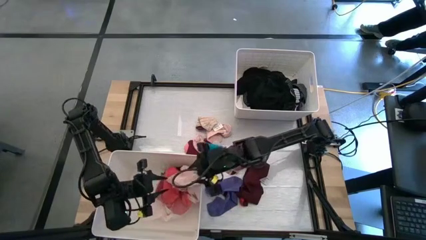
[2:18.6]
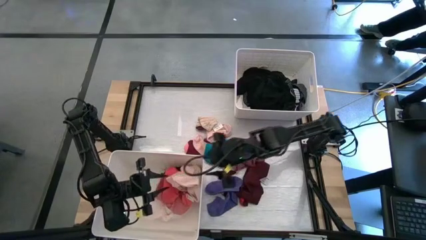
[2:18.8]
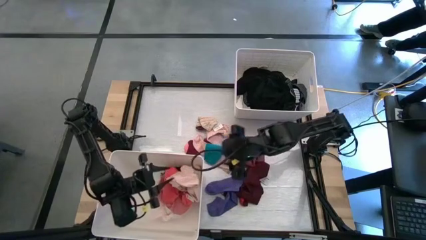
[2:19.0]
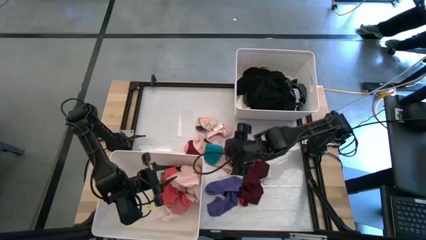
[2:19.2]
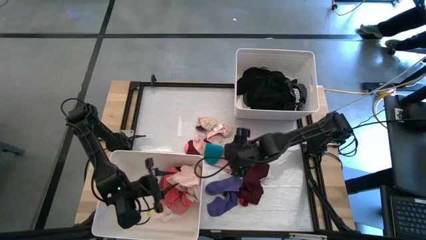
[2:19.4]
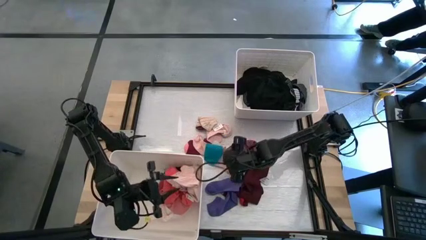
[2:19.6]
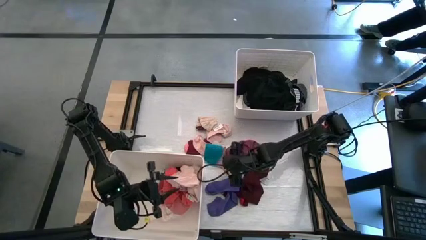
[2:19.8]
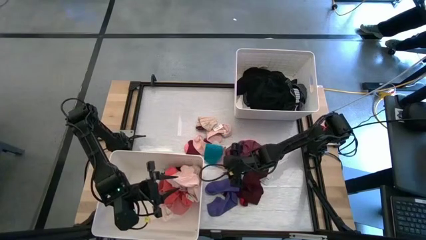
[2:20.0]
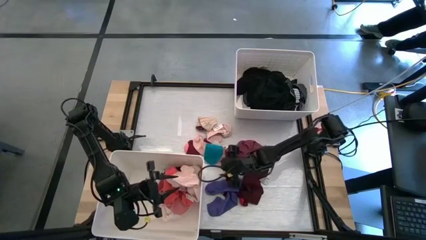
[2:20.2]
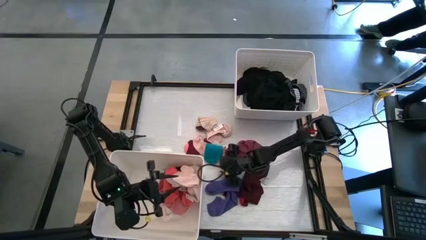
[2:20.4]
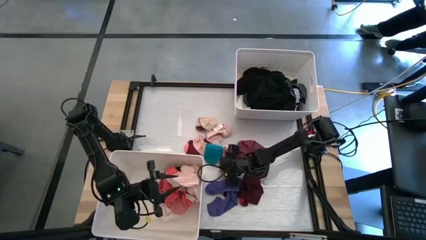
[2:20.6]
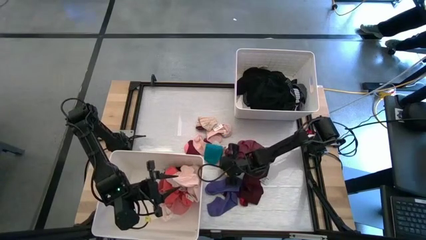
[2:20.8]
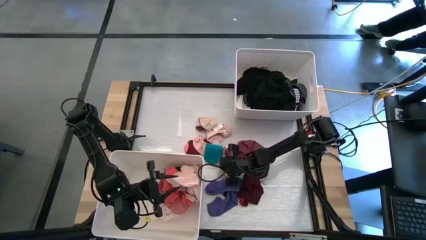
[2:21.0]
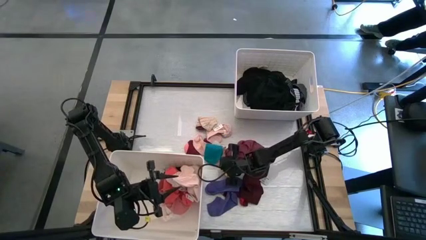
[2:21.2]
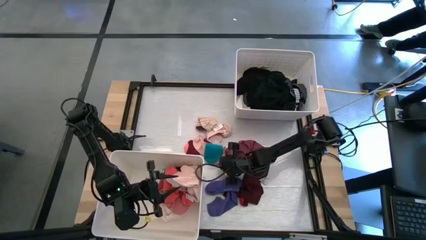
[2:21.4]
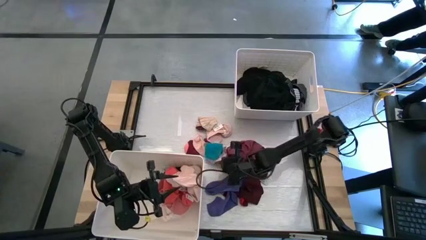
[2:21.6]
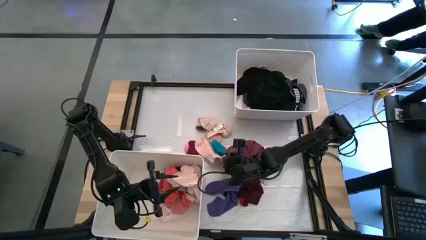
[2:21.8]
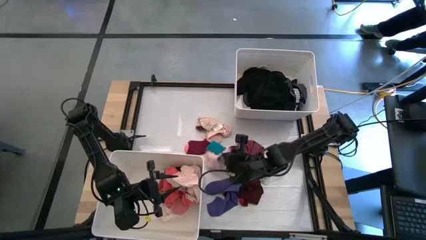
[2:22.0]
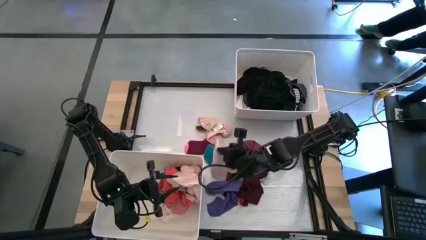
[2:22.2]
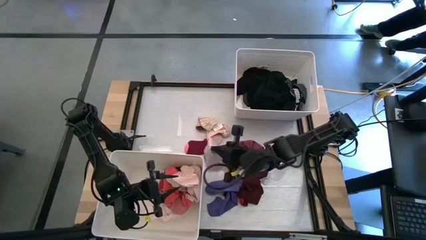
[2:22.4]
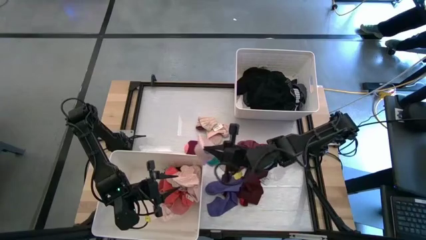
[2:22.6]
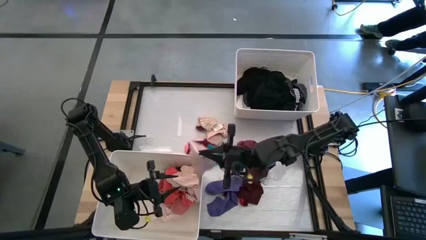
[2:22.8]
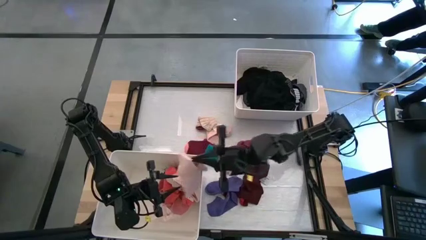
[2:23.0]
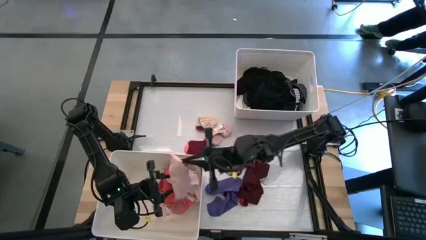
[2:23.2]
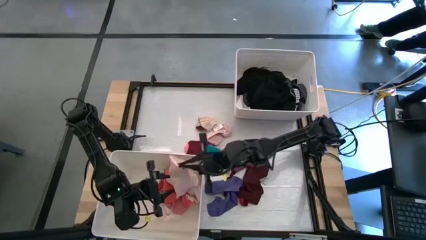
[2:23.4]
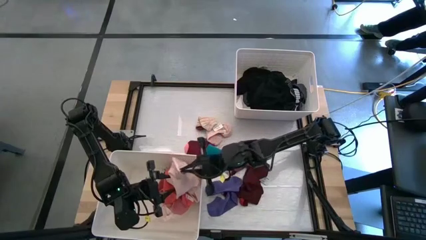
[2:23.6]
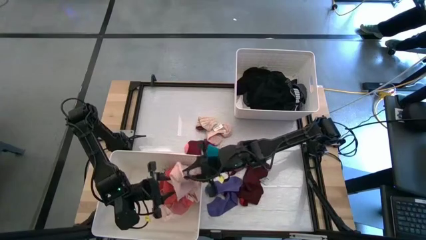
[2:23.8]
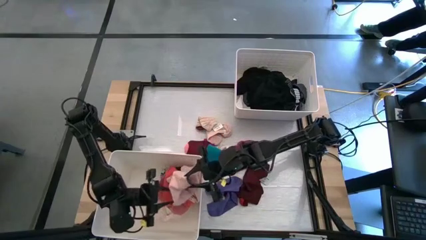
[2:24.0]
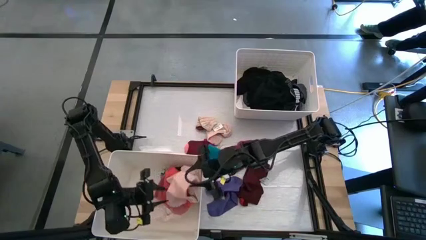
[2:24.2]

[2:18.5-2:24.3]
Task: Sort clothes
Put the light pink sock into the bottom white laundry bin

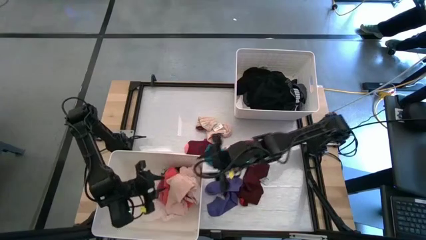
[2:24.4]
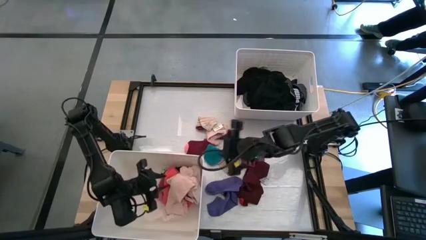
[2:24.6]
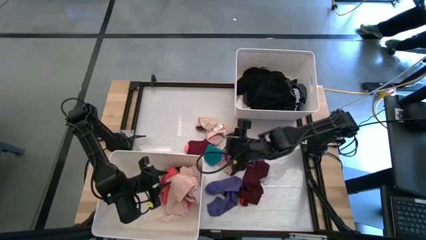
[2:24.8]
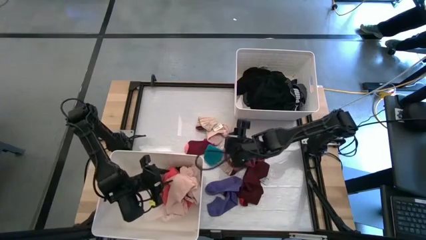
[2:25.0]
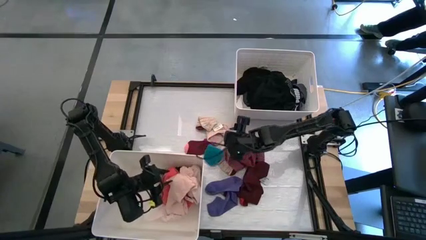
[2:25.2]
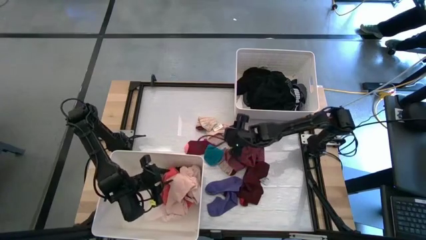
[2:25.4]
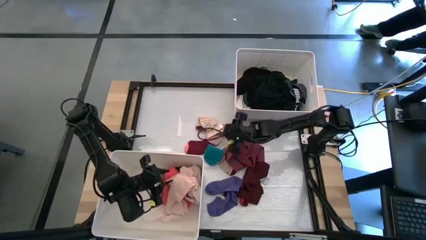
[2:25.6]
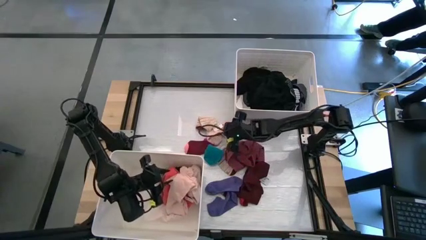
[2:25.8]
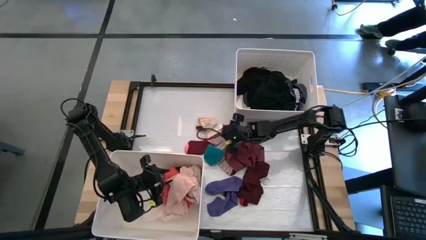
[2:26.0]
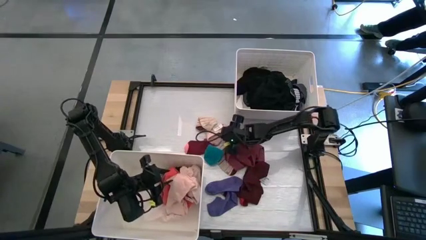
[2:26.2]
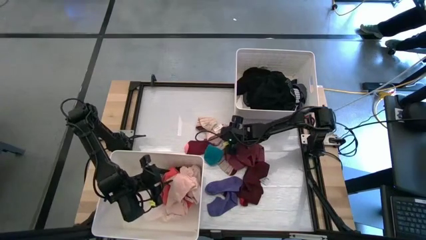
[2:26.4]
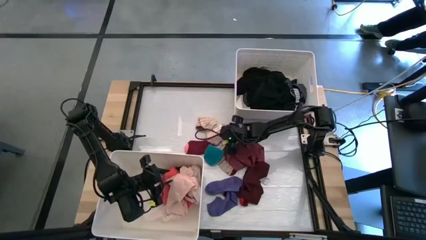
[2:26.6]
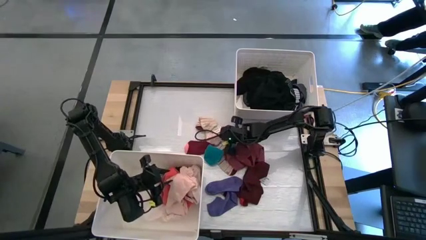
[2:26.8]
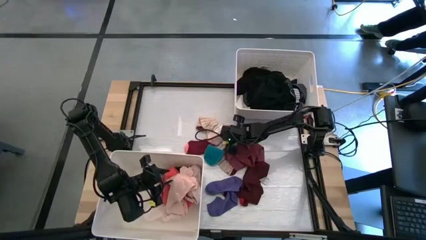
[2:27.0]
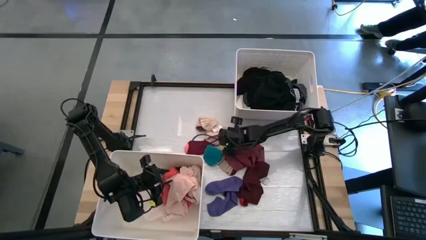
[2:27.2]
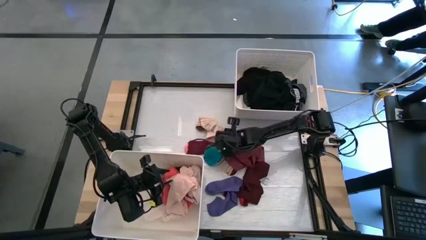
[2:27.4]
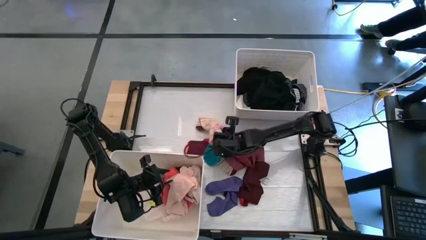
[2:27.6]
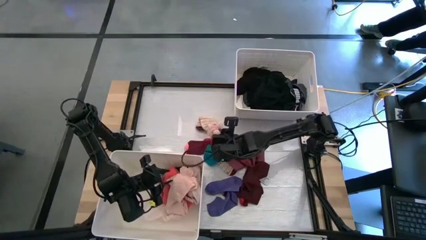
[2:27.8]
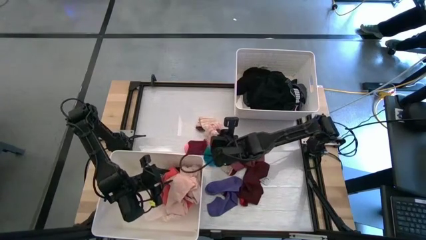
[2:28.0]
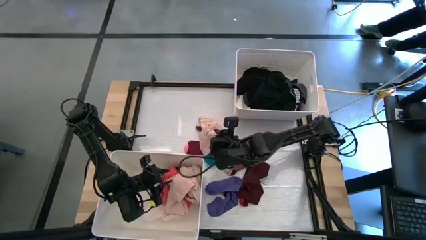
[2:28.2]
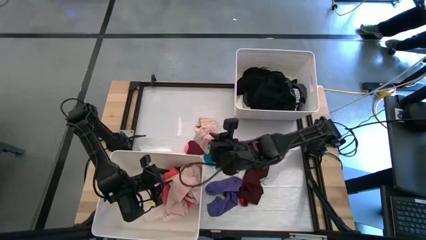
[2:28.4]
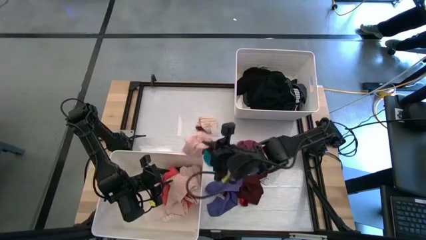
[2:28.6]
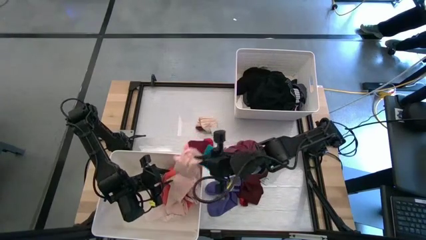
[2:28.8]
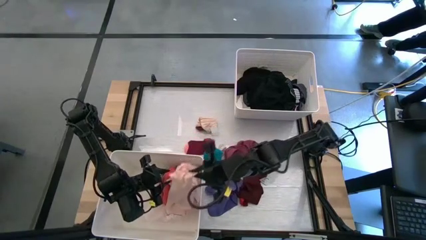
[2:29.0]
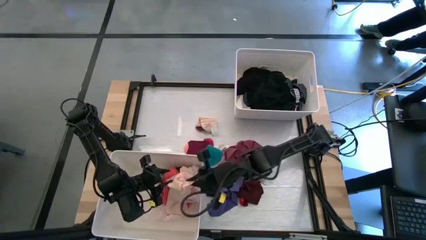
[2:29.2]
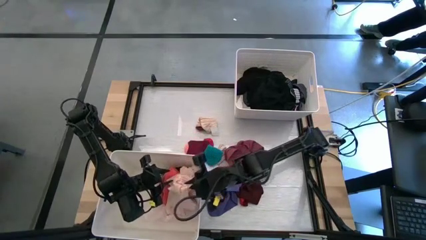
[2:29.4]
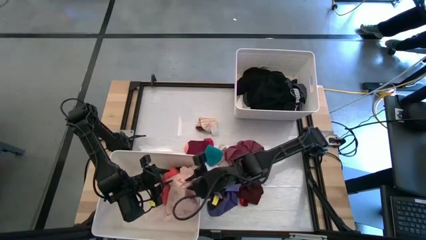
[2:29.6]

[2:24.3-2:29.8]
Put the light pink sock into the bottom white laundry bin

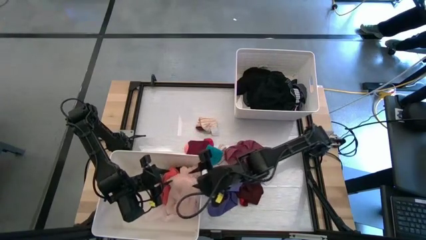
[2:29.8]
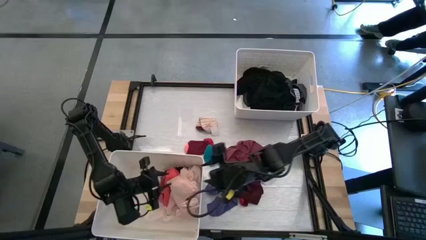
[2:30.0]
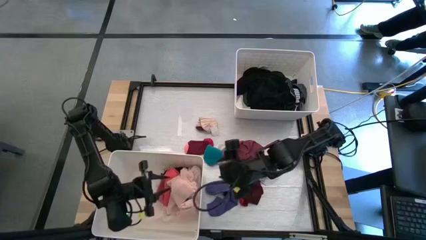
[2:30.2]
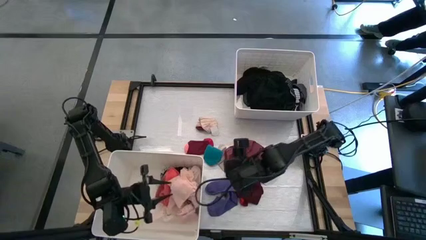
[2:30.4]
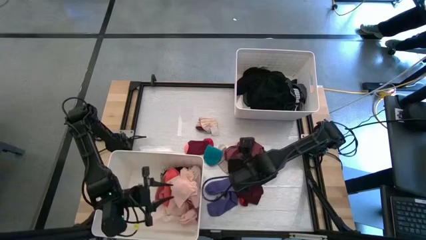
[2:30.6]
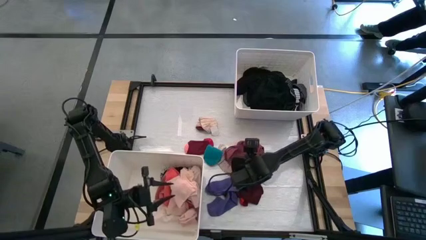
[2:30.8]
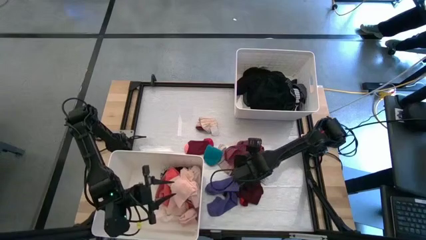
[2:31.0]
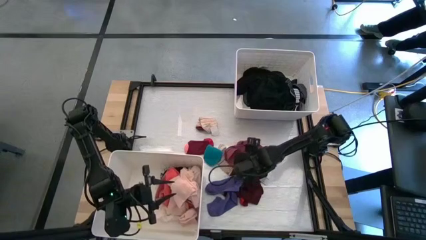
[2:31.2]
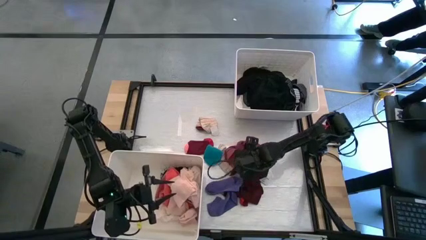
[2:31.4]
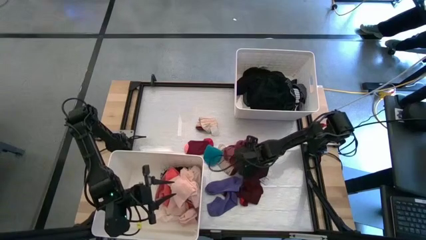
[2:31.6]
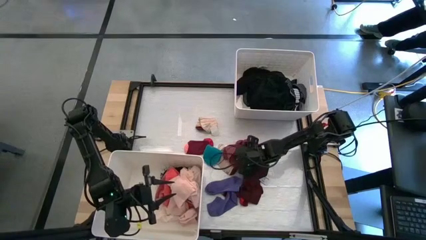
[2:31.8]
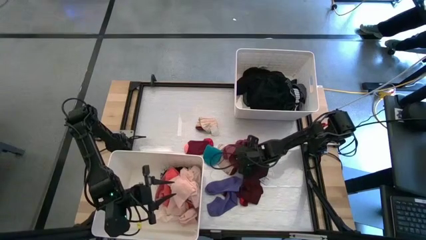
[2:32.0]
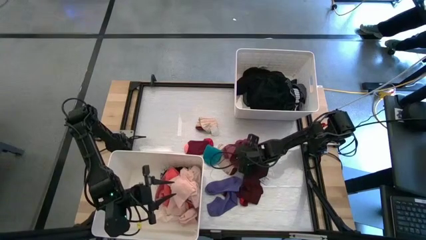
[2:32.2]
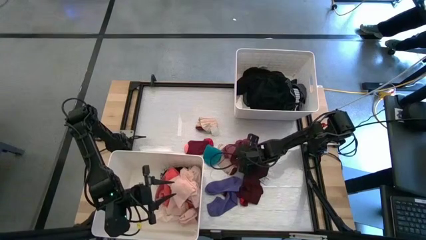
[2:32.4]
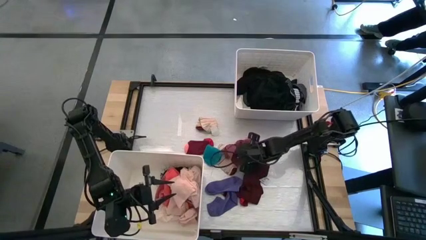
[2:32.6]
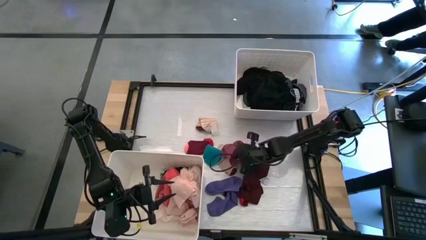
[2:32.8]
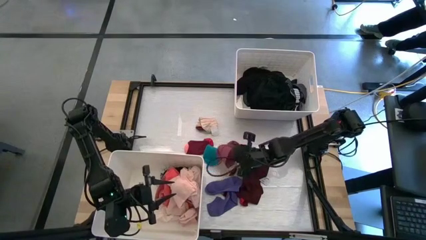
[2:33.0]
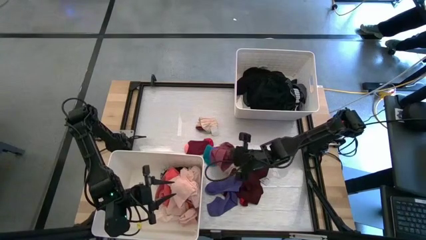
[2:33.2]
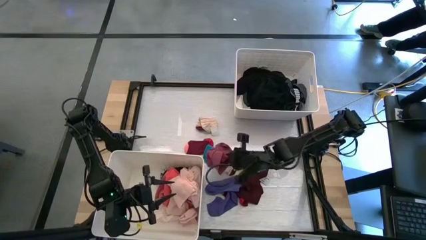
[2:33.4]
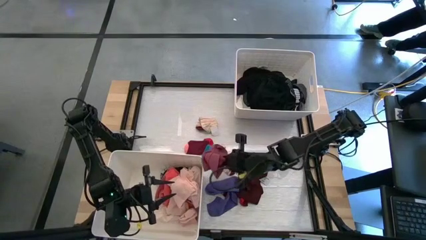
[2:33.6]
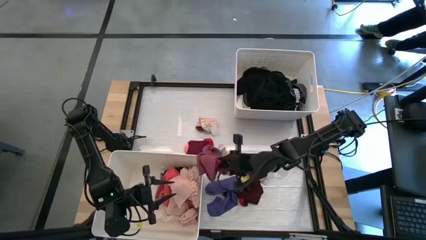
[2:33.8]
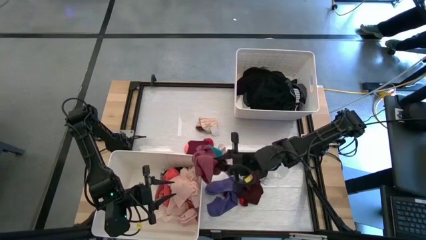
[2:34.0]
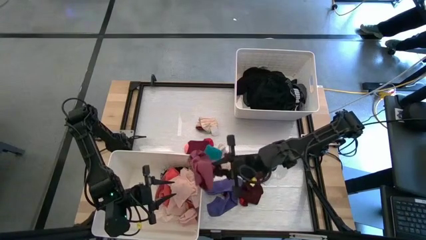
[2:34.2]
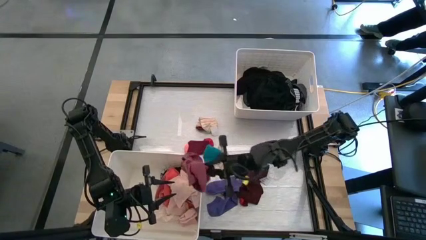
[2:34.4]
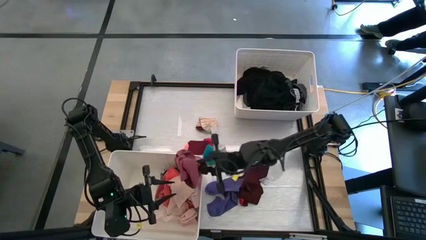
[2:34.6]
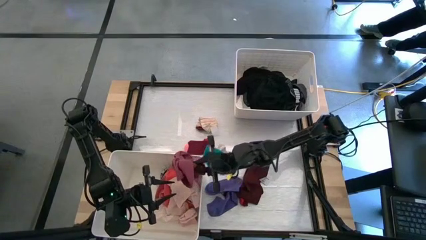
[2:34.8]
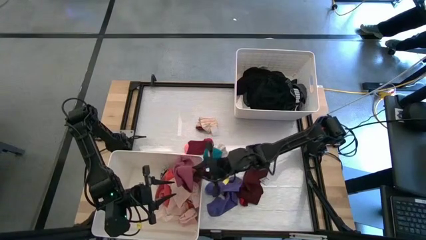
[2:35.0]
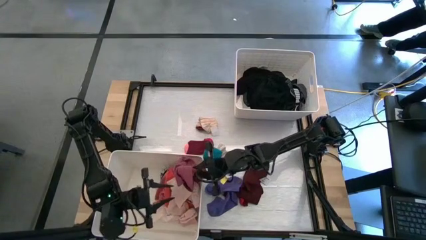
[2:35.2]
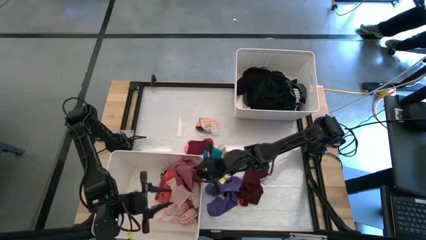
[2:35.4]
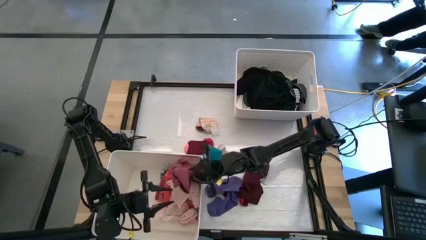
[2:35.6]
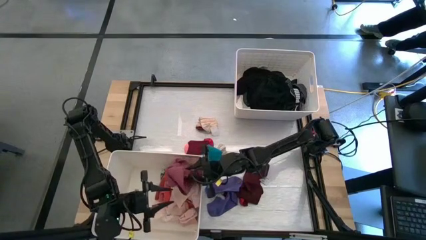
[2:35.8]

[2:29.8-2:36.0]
Put the red underwear into the bottom white laundry bin
